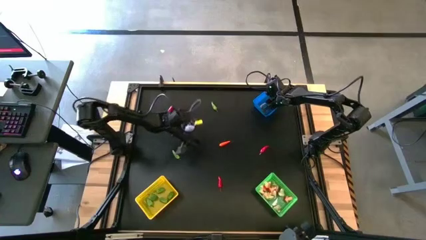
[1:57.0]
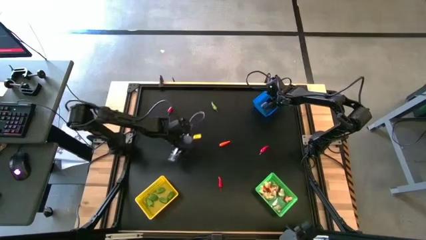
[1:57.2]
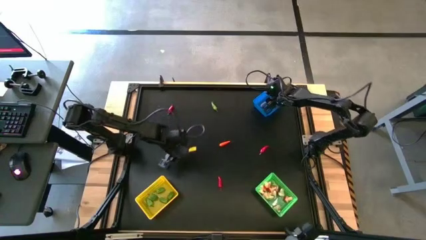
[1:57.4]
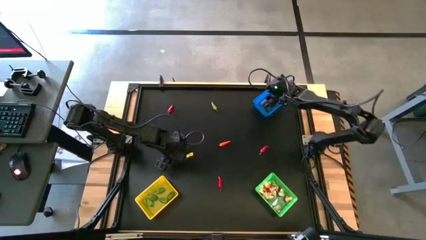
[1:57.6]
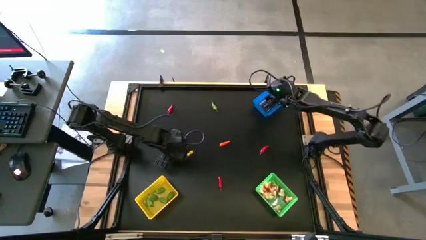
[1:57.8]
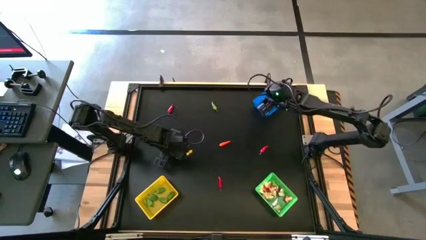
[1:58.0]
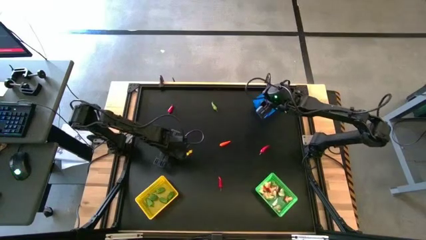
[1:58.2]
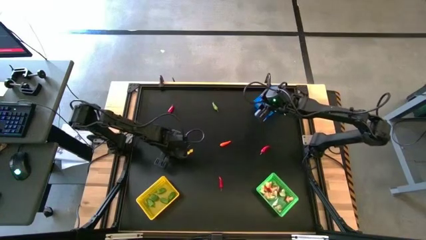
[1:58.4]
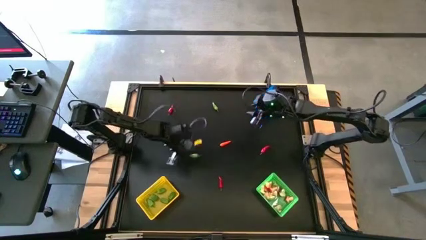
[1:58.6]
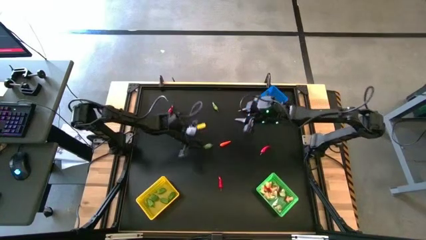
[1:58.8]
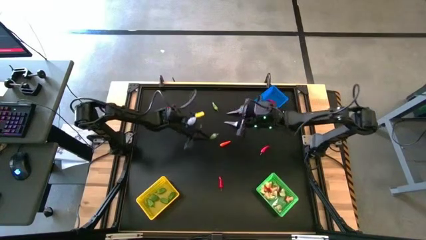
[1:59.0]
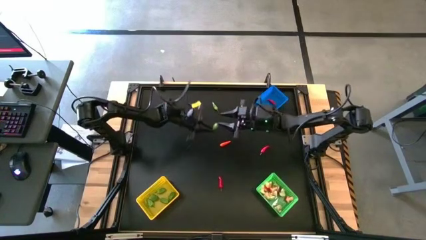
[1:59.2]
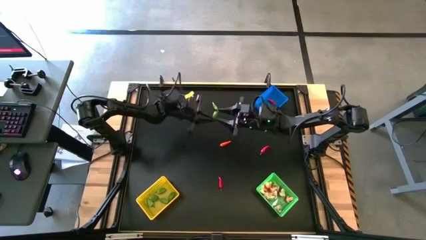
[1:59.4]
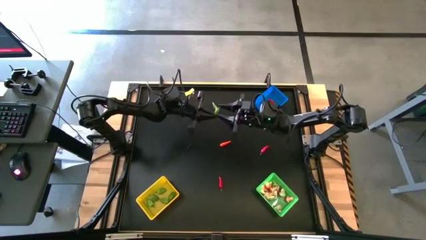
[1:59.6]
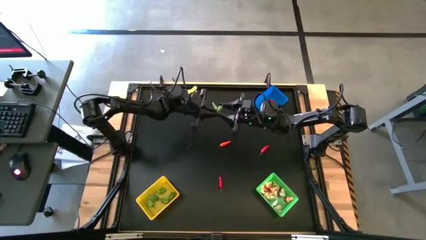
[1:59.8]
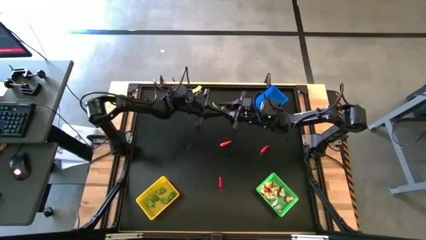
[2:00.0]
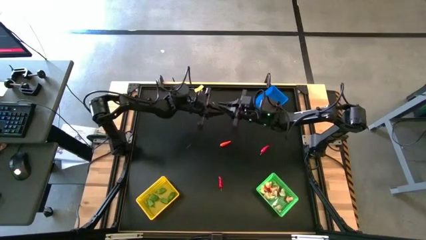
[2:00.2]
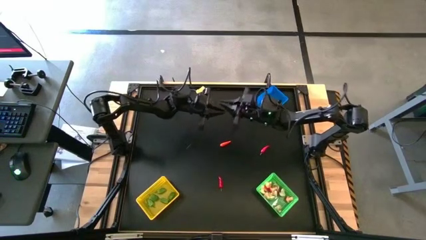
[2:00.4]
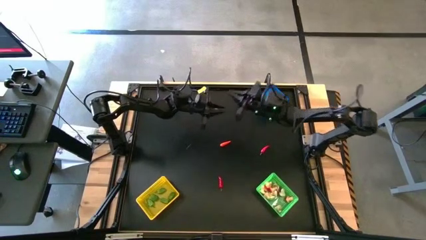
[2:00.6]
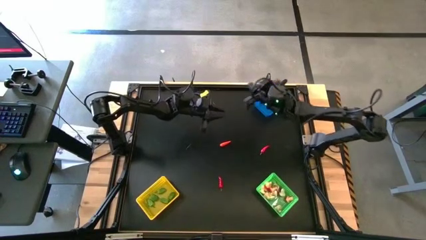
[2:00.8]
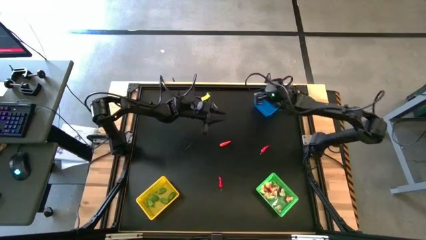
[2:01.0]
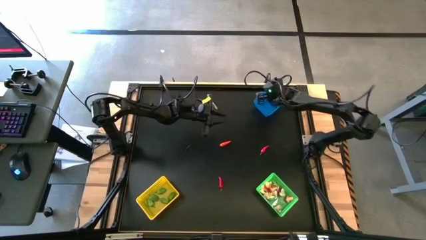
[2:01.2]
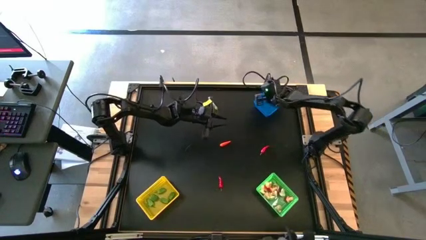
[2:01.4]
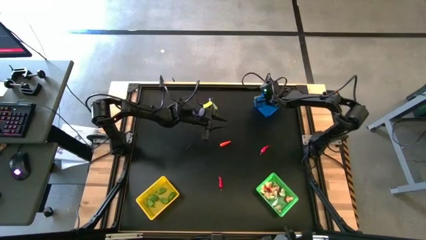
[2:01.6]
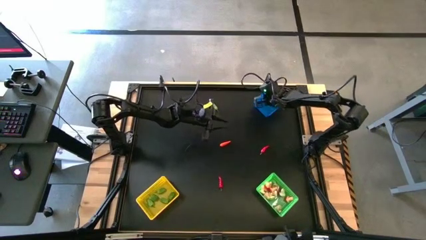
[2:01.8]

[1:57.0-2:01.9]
Task: Sort produce into baskets
Put the green chili pepper into the blue bin

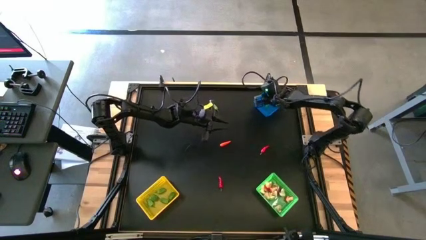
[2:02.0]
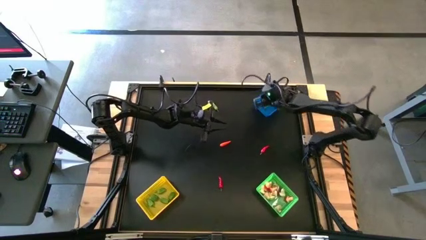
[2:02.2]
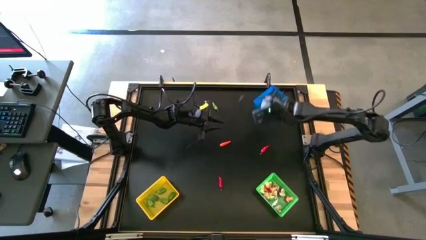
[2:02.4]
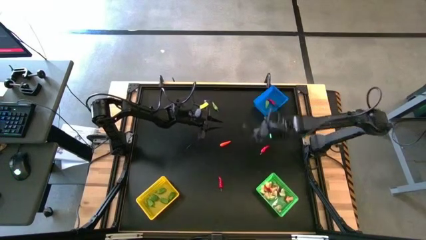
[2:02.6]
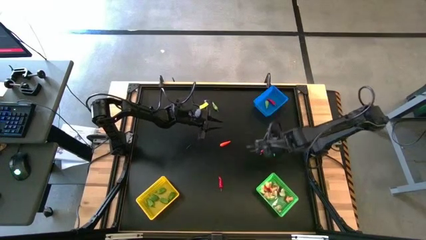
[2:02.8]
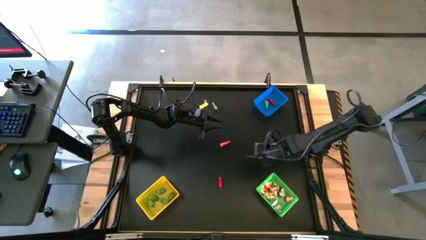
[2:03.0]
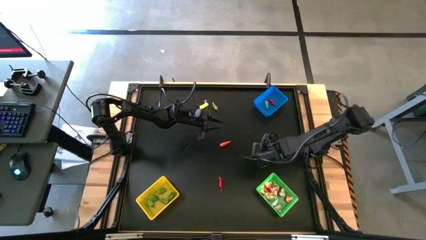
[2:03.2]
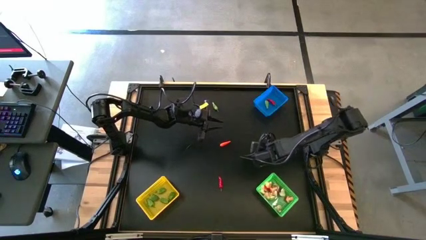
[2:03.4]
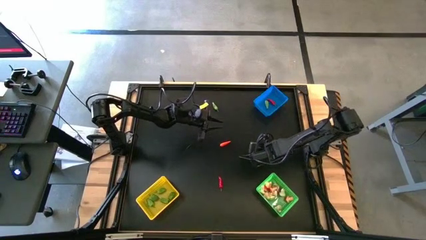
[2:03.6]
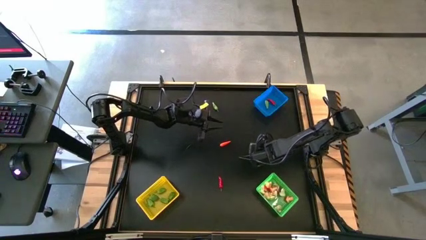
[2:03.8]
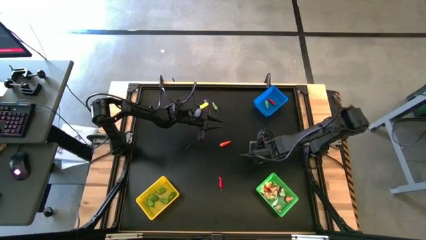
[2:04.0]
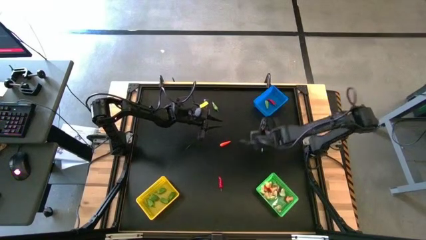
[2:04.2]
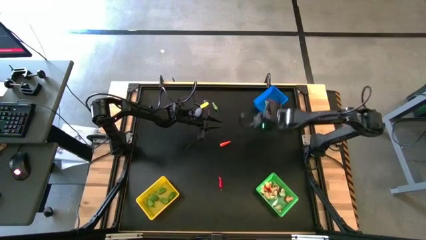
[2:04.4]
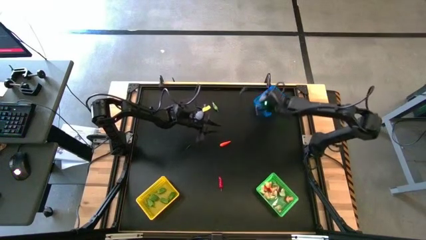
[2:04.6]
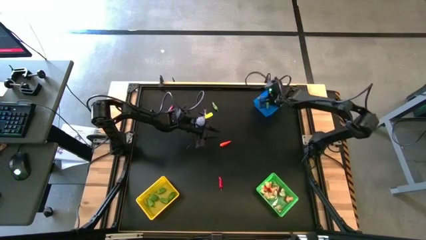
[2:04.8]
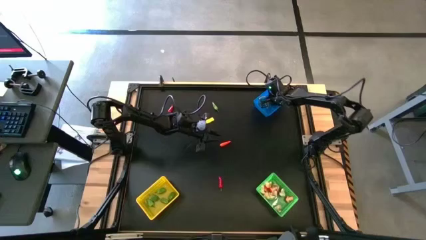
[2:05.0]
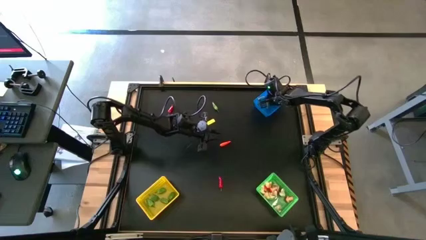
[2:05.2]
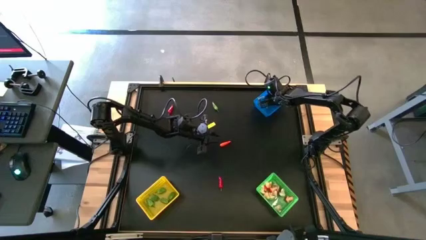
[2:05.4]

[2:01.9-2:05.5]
Put the red chili pepper into the blue bin

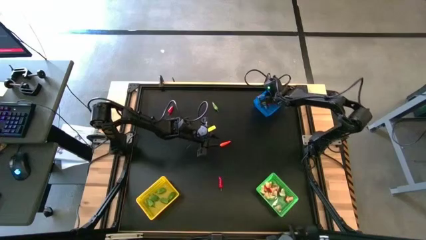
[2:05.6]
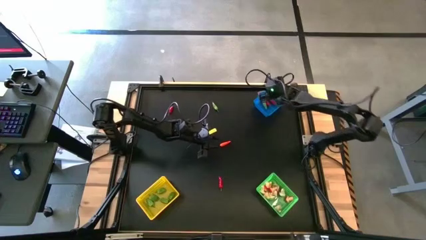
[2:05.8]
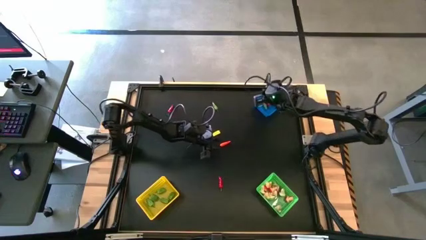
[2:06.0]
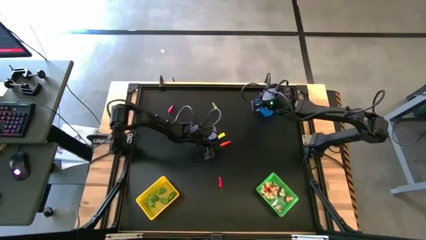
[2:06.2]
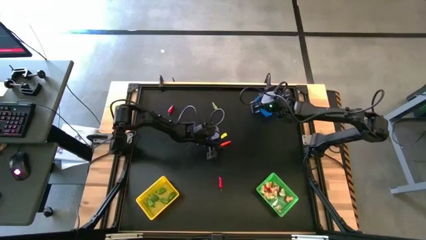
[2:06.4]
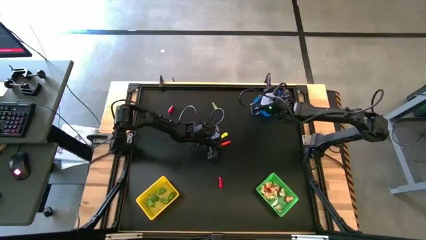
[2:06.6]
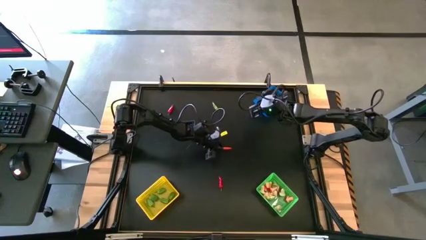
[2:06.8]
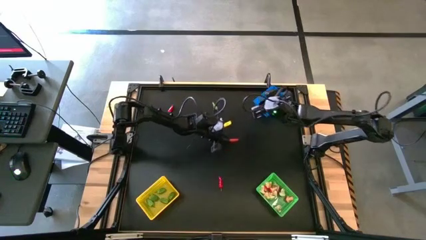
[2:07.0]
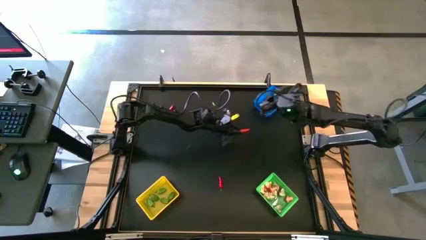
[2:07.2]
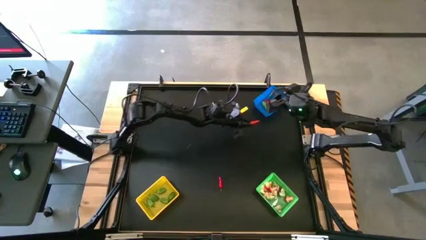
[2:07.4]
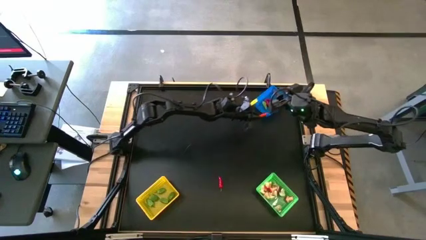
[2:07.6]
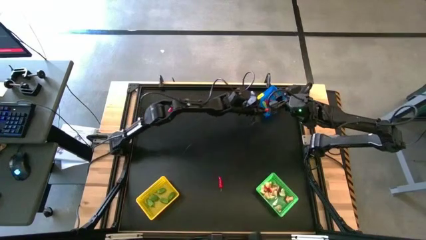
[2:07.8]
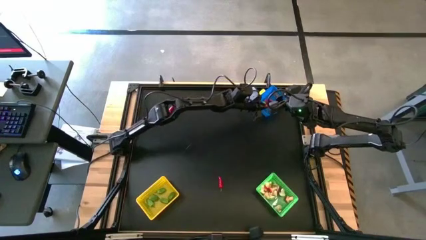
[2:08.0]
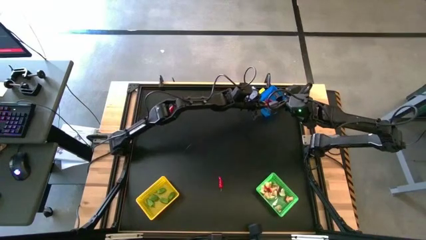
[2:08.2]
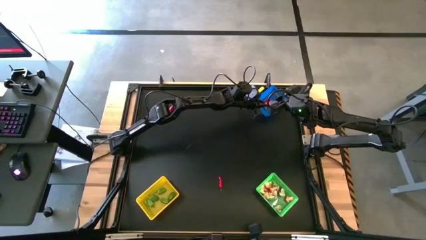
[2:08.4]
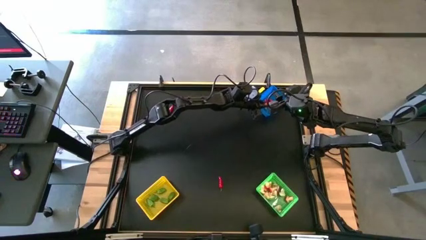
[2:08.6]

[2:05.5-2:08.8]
Put the red chili pepper into the blue bin

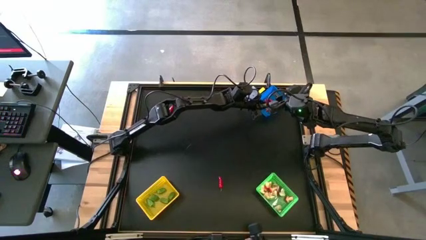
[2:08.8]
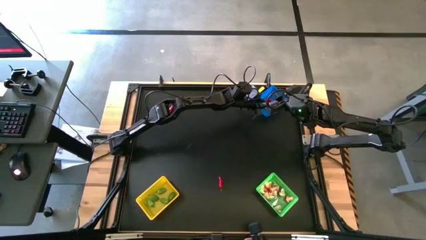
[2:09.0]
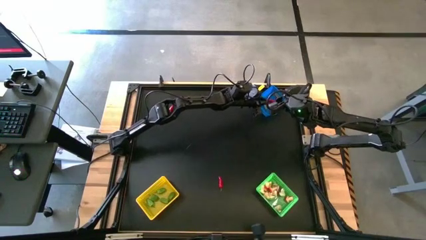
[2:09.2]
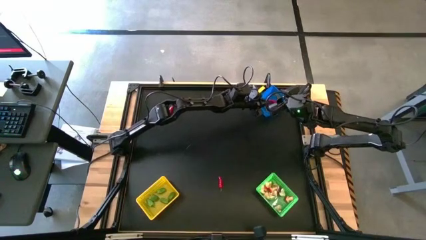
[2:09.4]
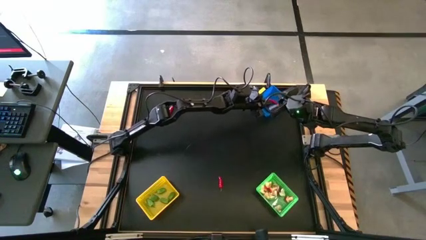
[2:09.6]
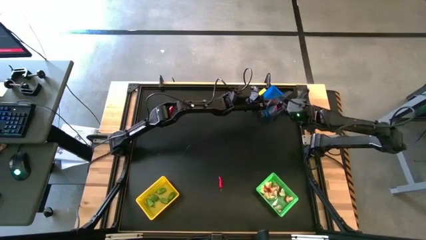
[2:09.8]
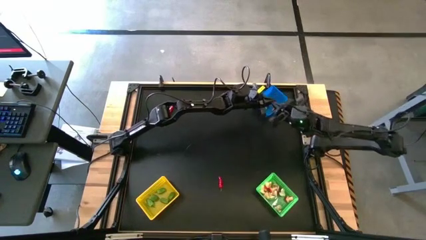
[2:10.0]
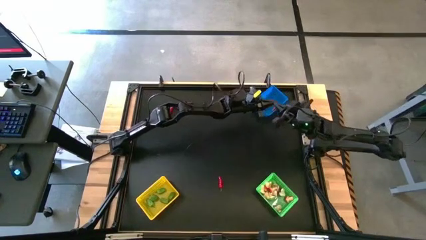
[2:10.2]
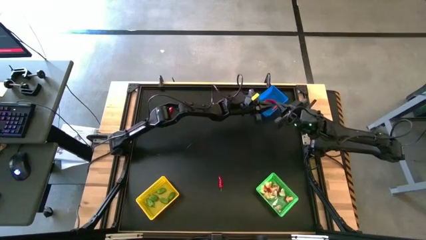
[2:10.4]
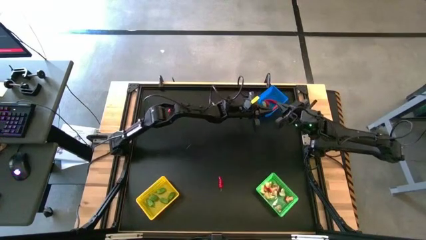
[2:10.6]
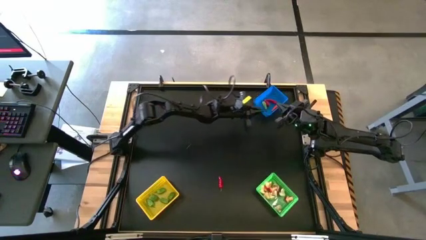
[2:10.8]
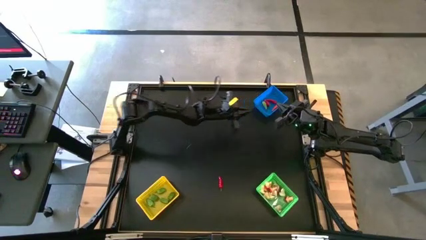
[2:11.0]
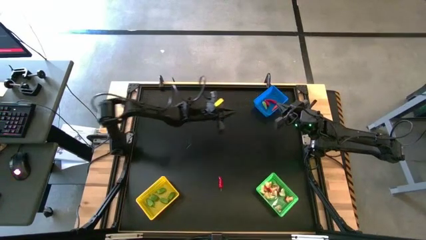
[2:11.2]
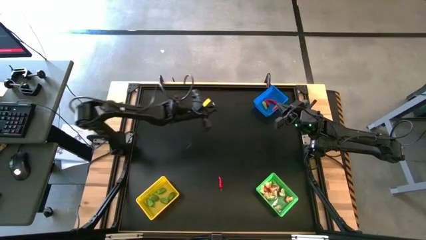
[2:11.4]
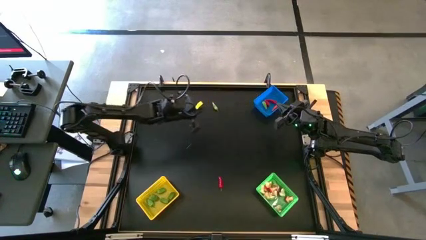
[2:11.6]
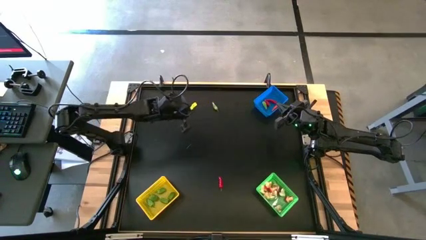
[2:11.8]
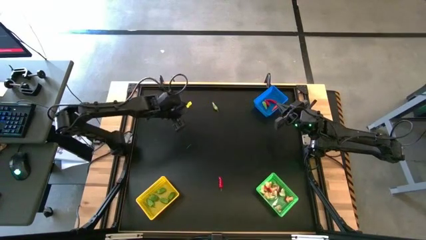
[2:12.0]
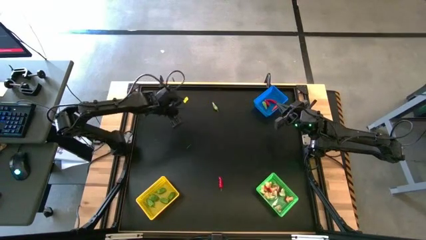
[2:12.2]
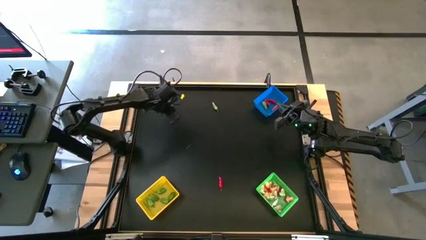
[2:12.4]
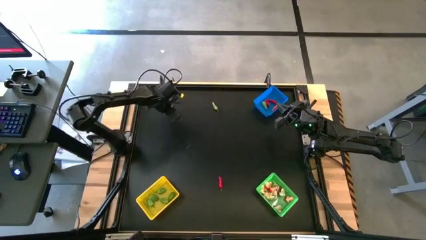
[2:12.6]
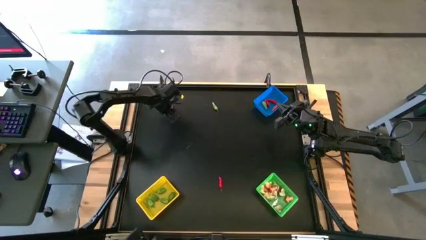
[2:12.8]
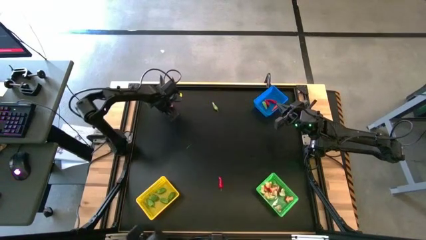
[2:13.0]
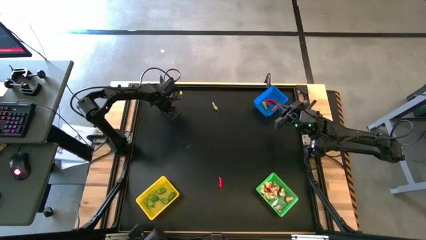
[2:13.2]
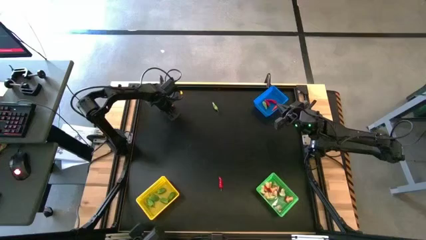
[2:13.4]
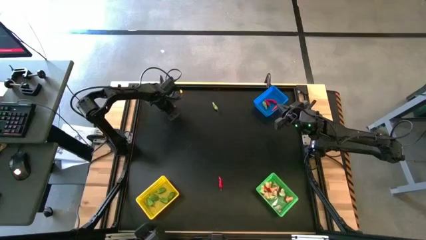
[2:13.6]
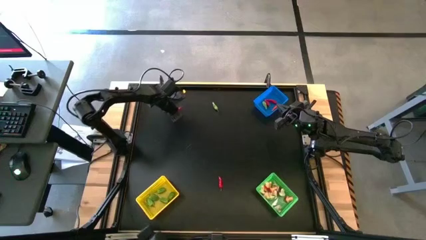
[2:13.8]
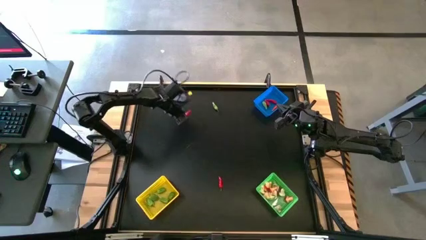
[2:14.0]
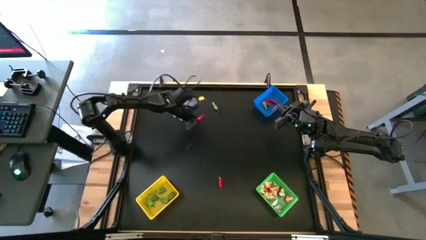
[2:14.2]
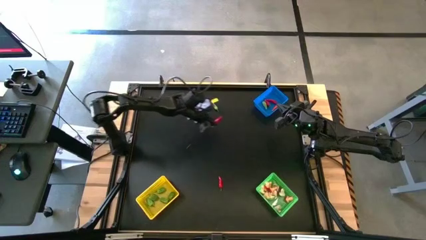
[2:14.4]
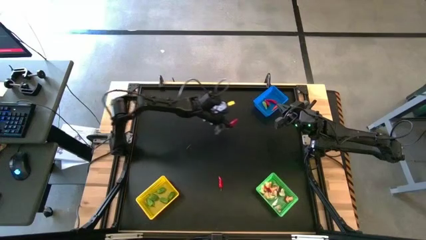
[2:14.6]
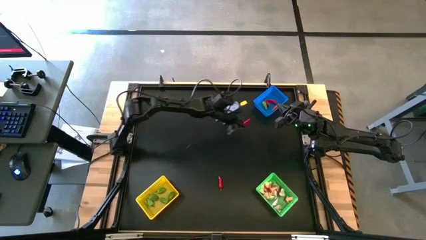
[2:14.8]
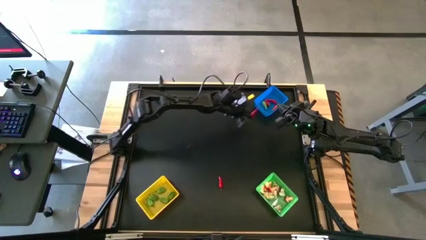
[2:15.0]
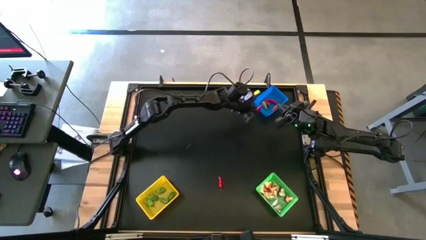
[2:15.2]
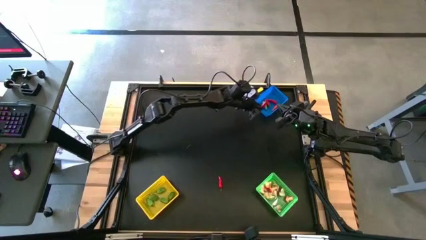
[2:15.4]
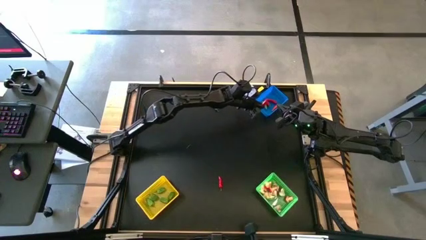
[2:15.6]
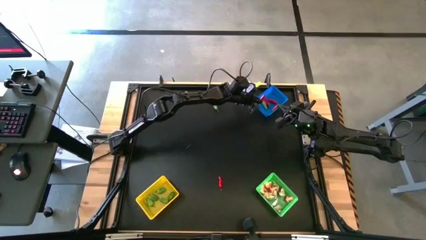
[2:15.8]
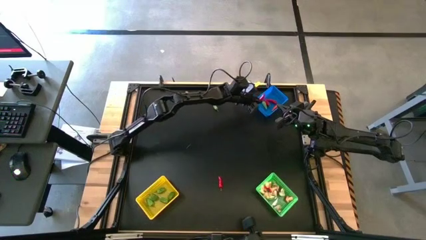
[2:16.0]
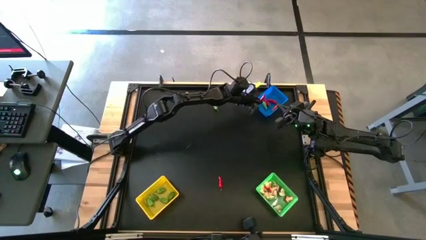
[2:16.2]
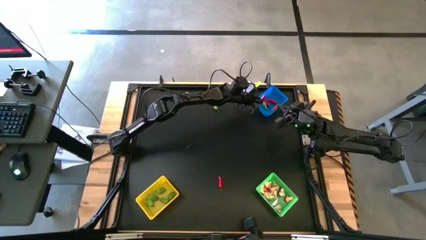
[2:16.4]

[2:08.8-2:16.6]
Put the red chili pepper into the blue bin
